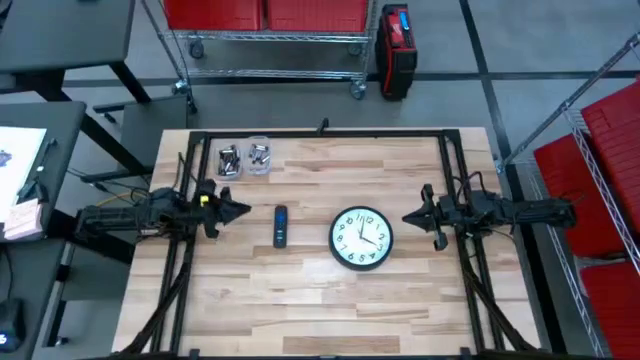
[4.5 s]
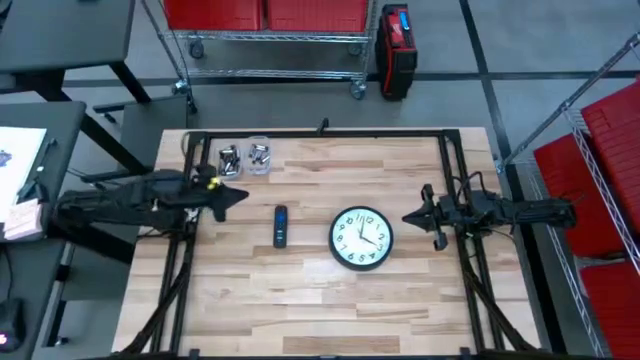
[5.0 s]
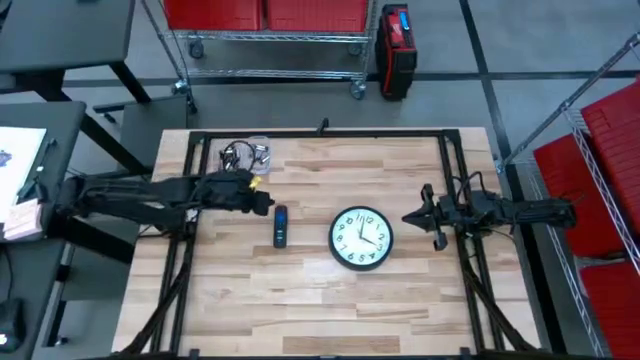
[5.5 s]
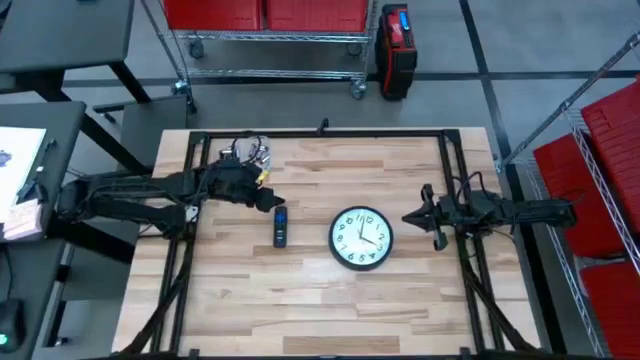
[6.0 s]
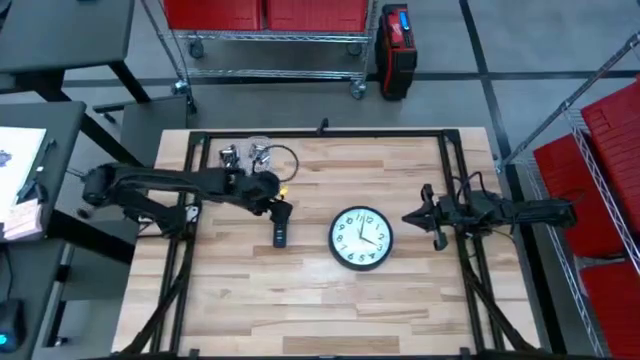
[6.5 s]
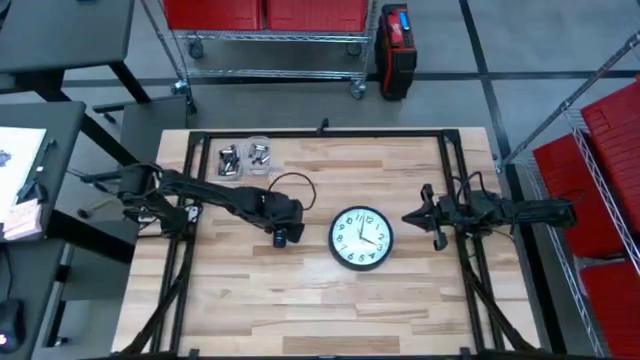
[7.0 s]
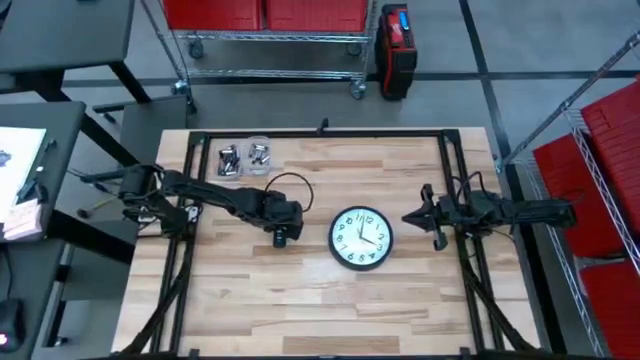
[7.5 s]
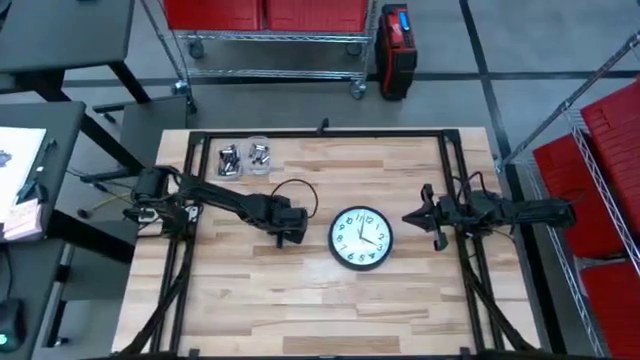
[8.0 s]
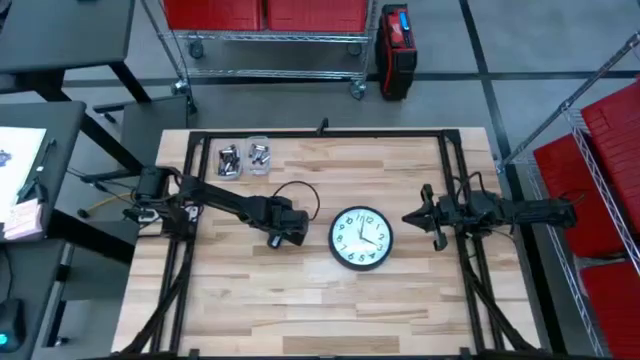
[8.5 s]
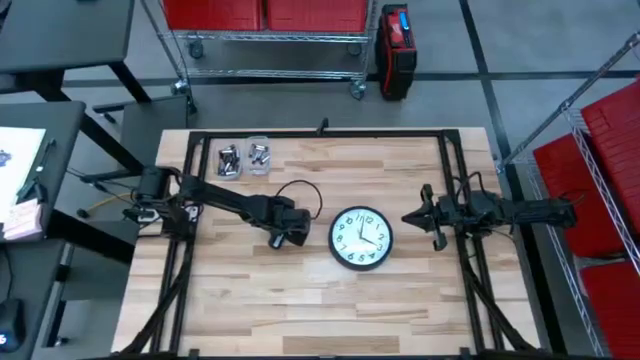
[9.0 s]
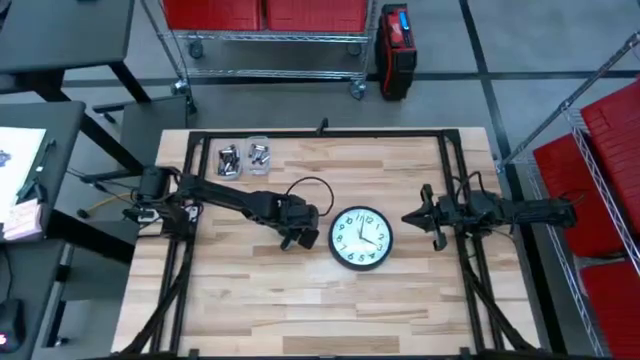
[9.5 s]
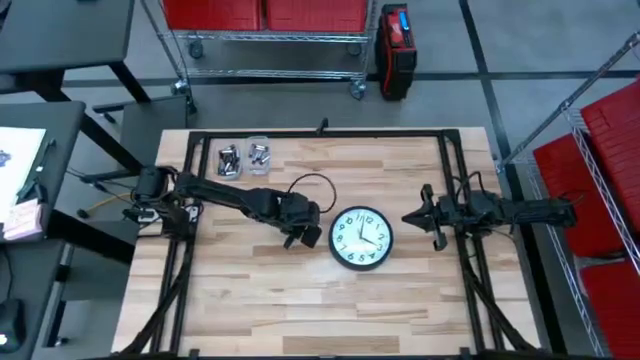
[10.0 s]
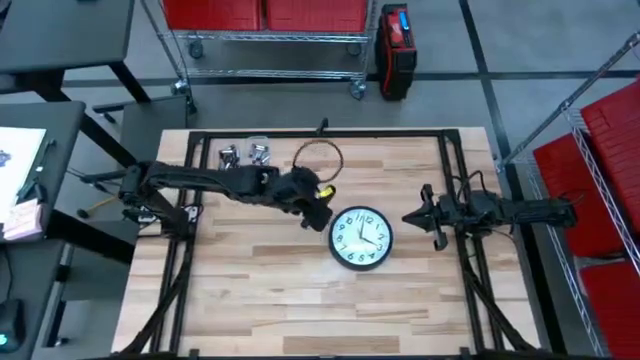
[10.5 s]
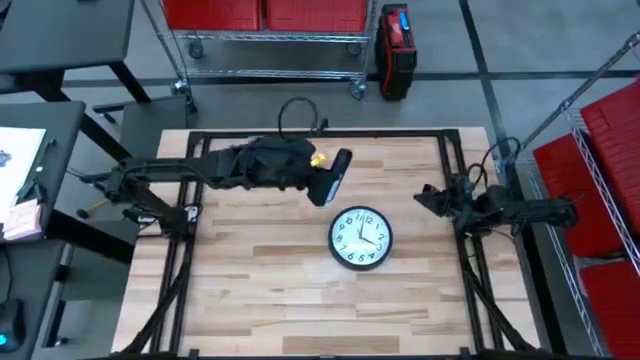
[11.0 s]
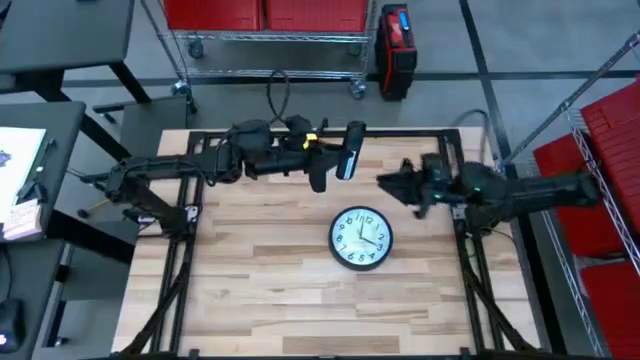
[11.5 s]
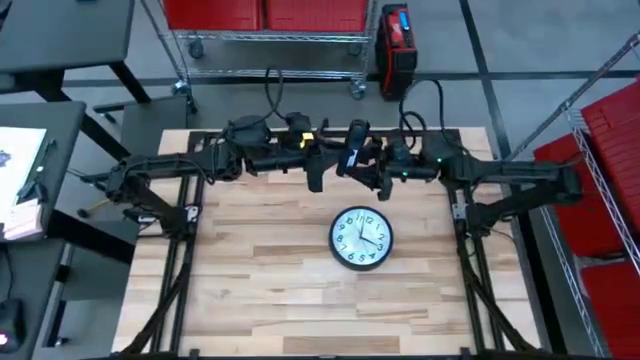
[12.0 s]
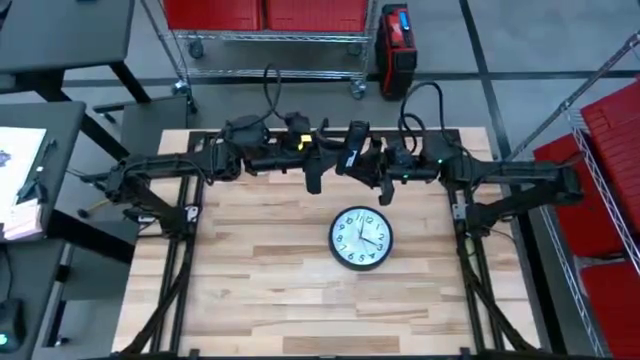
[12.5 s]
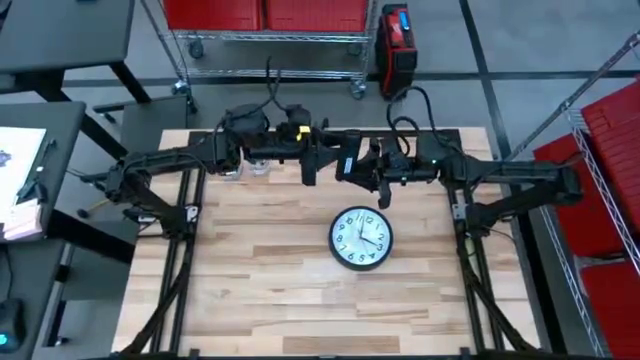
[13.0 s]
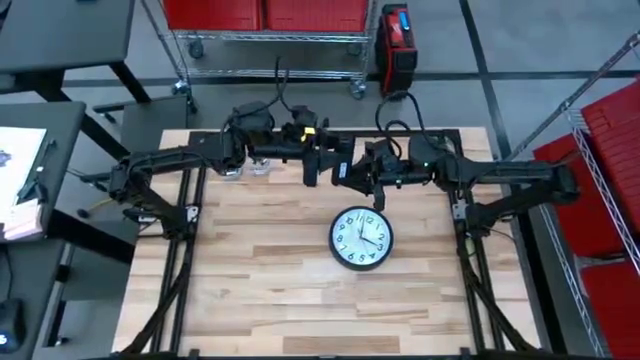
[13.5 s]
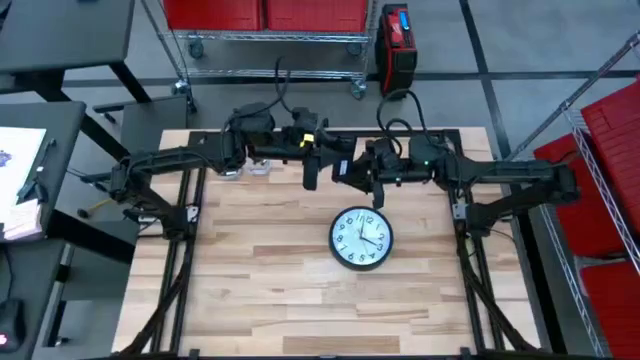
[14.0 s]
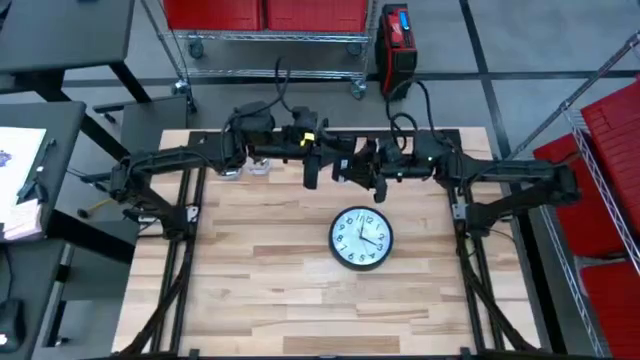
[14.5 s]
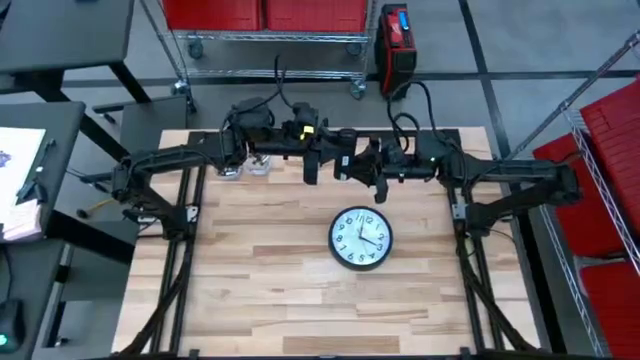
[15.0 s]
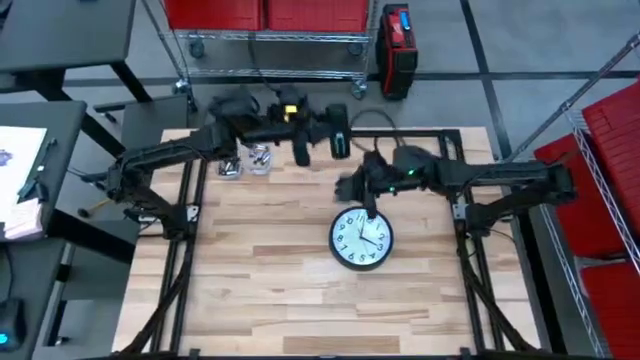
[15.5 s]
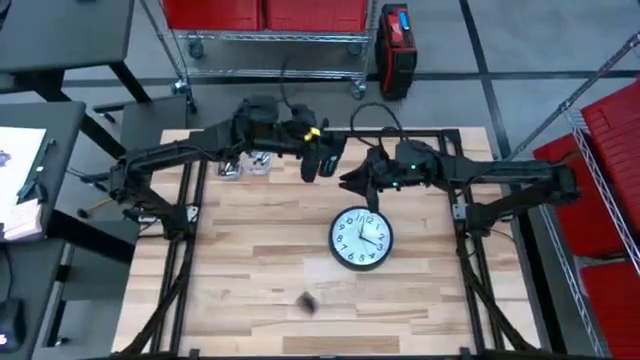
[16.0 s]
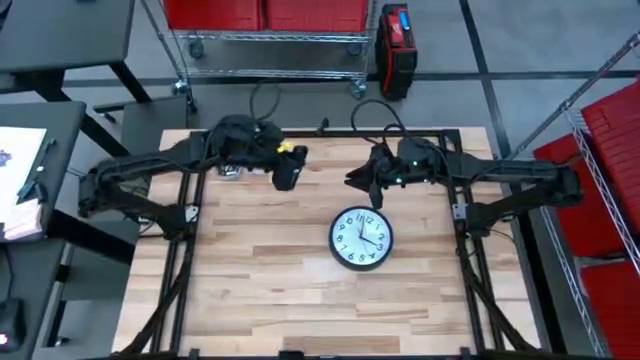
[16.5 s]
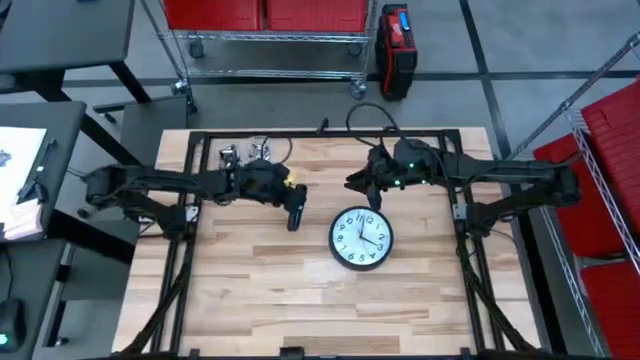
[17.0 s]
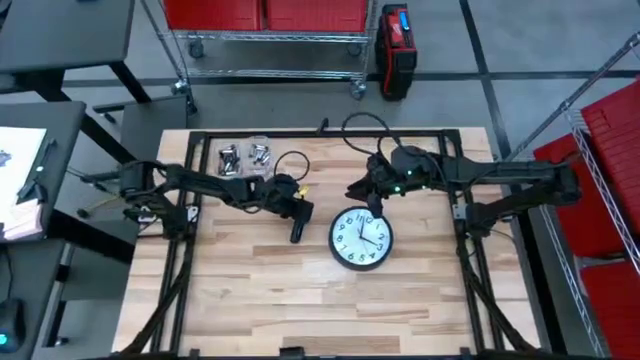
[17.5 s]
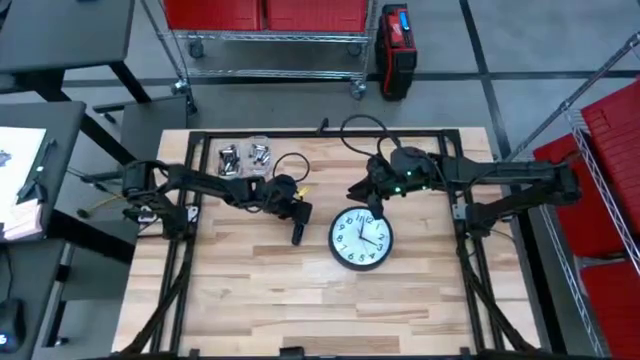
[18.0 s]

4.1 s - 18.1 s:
Task: Insert battery
Remove the remote’s battery cover
